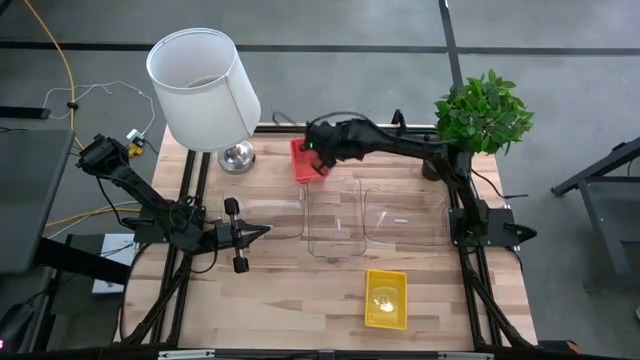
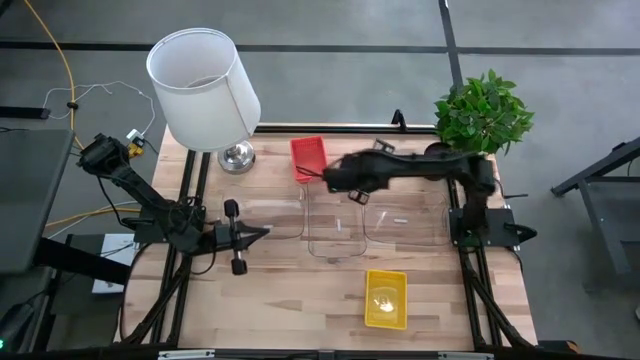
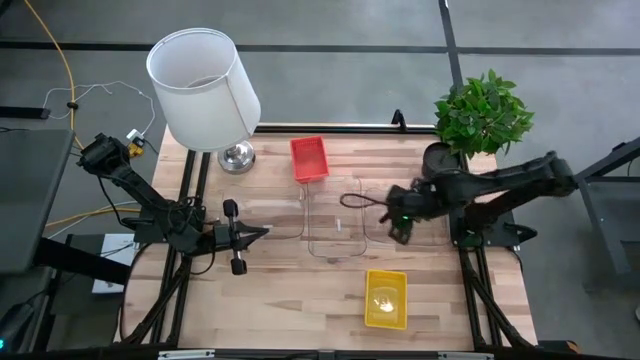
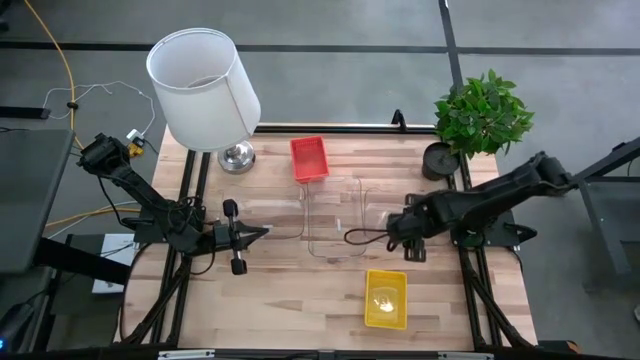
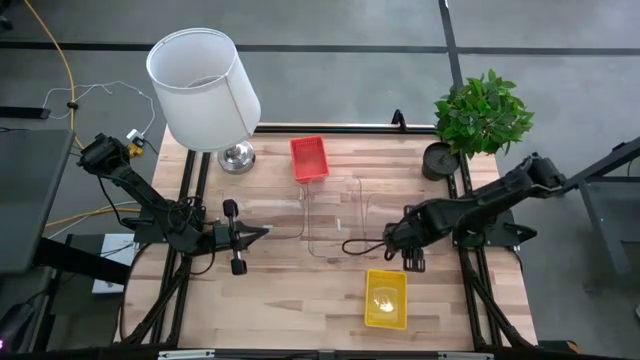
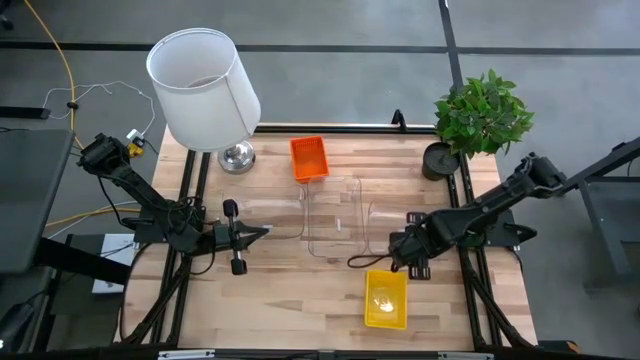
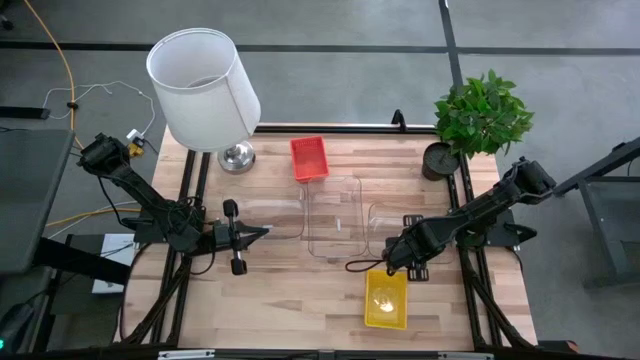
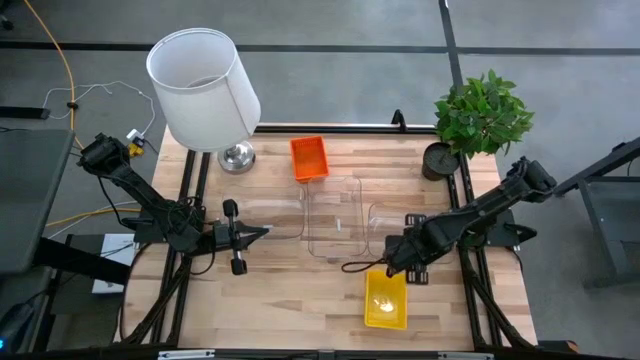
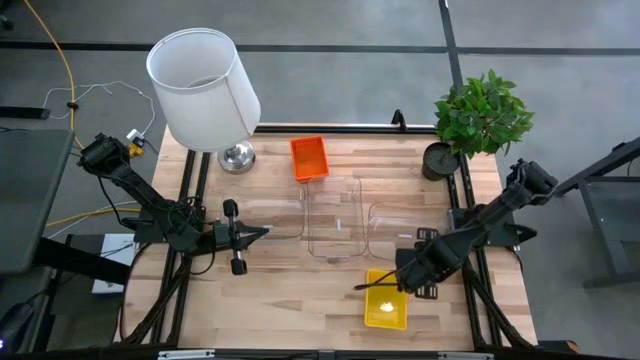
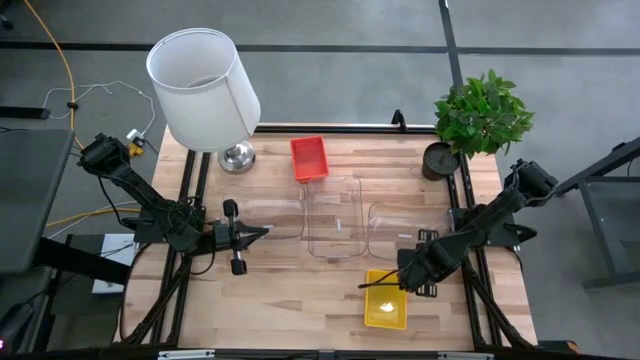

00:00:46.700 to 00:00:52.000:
Stack the right transparent bin on the middle transparent bin

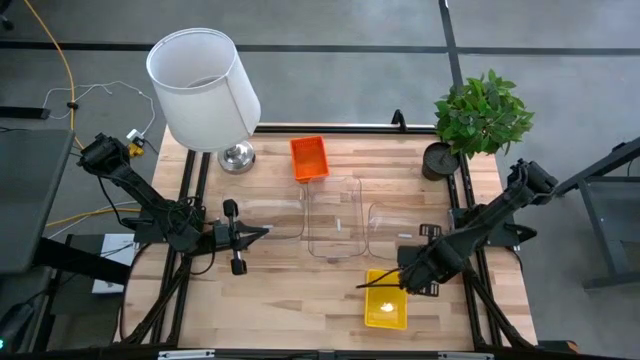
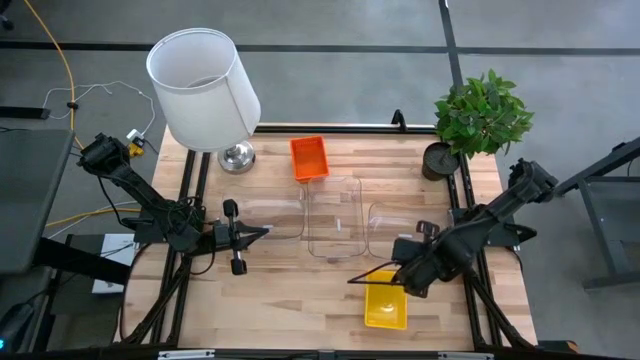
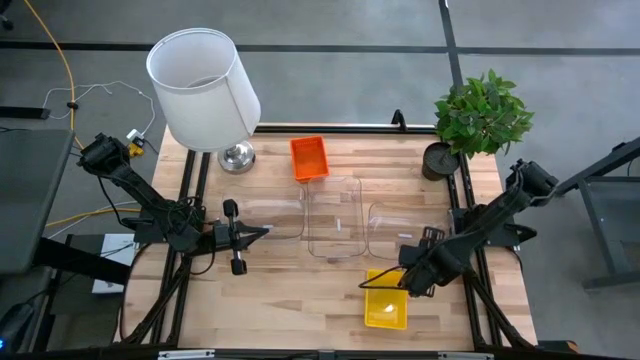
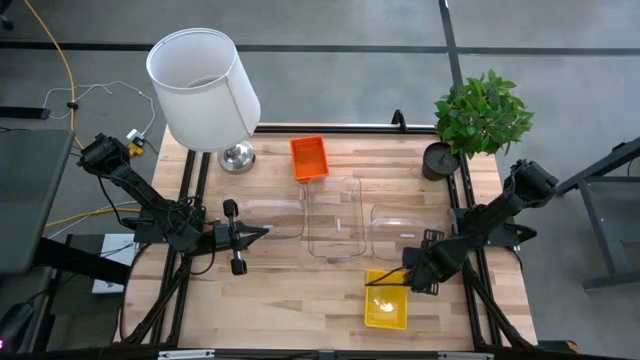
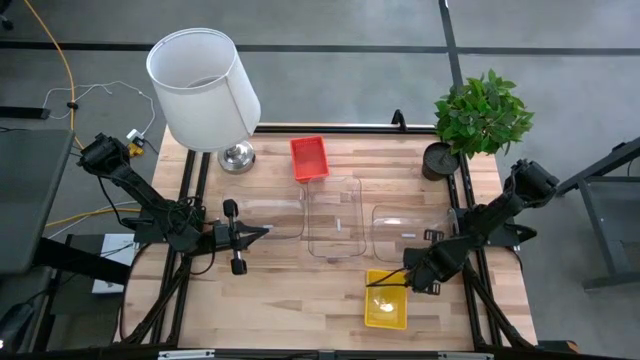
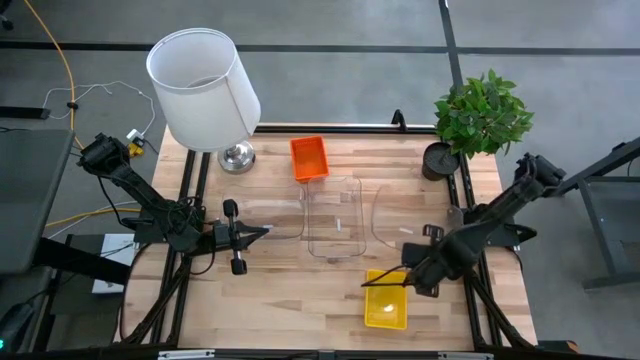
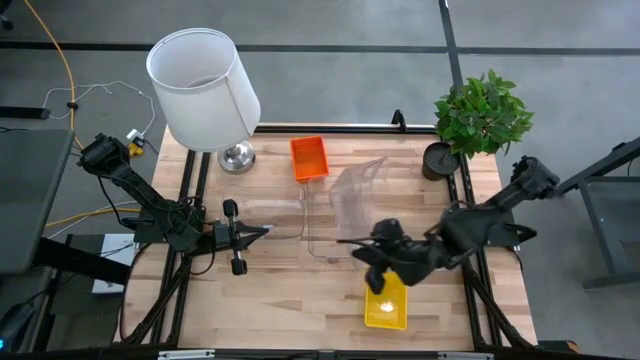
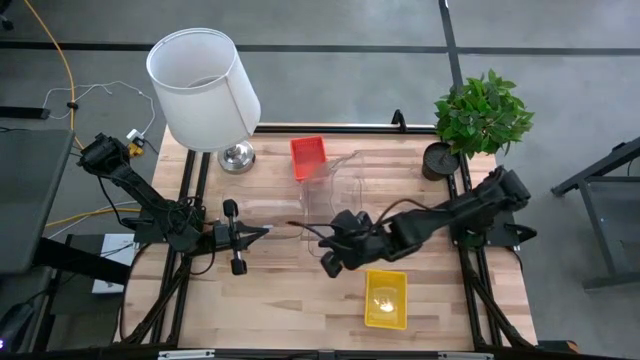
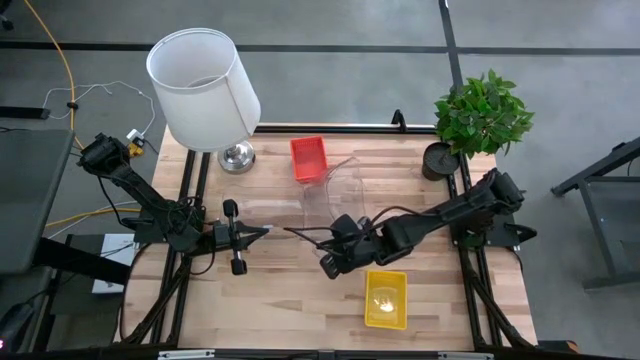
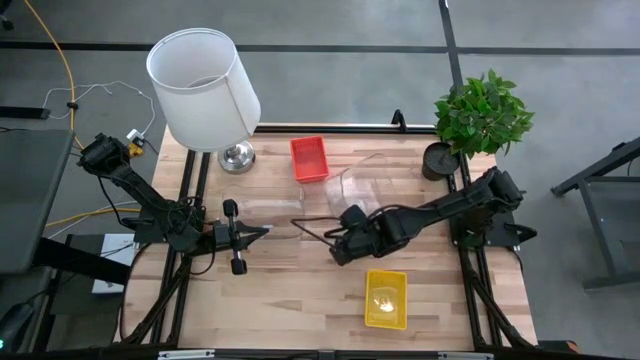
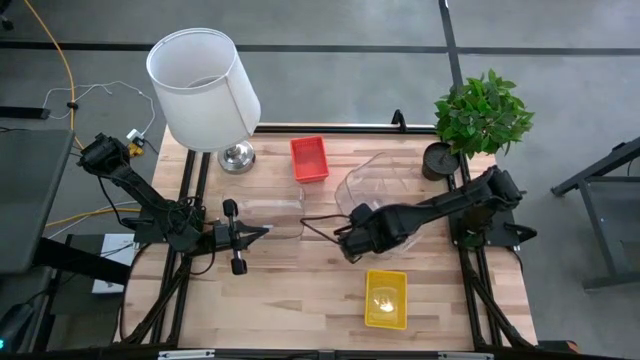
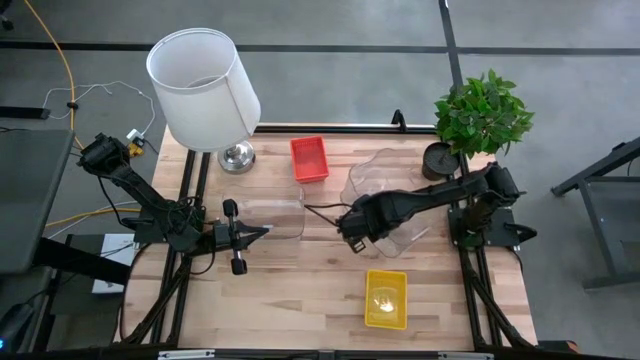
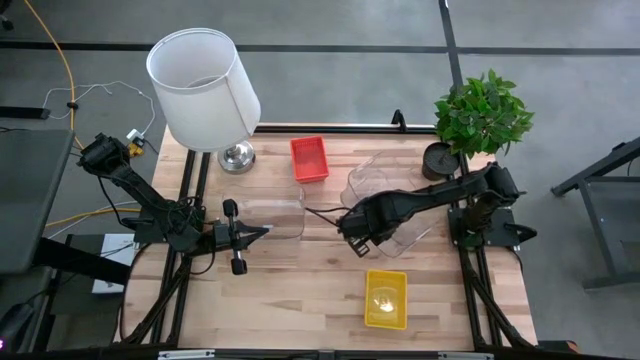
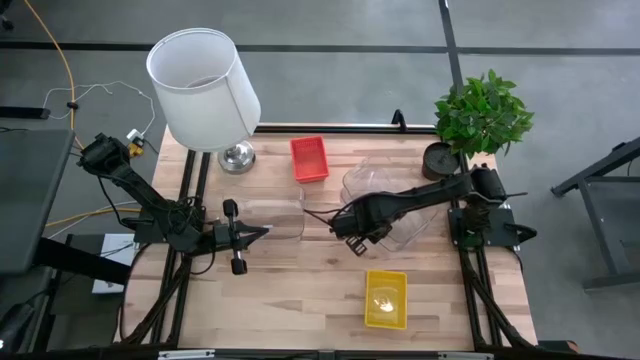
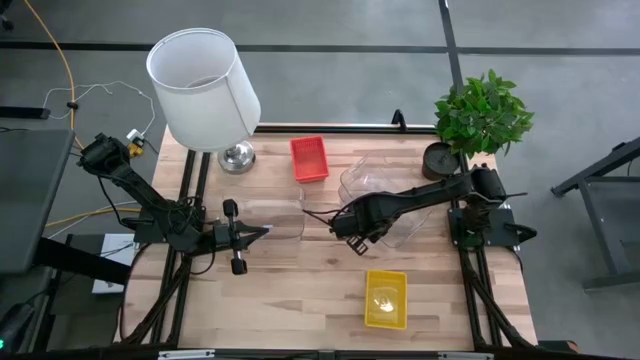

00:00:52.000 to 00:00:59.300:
Stack the right transparent bin on the middle transparent bin

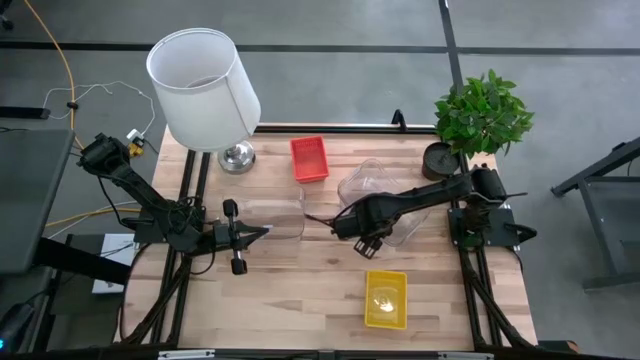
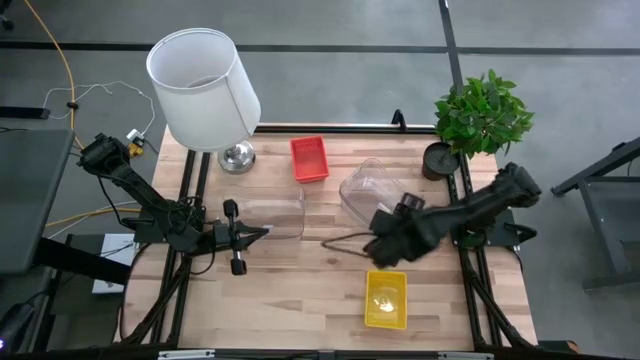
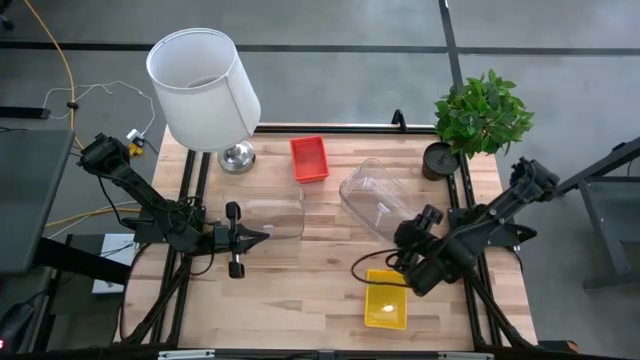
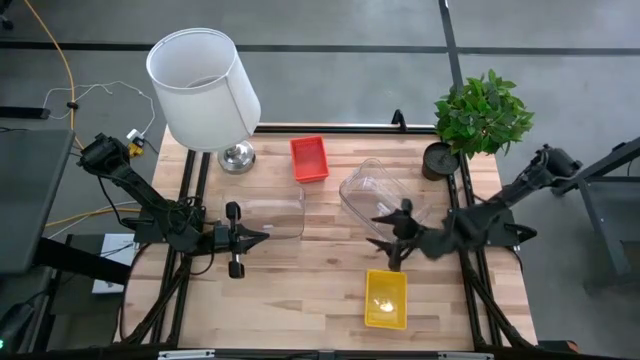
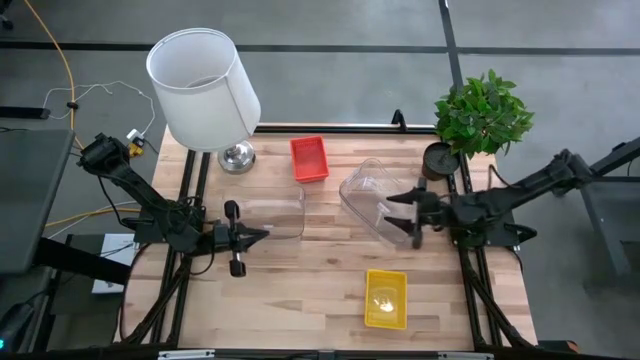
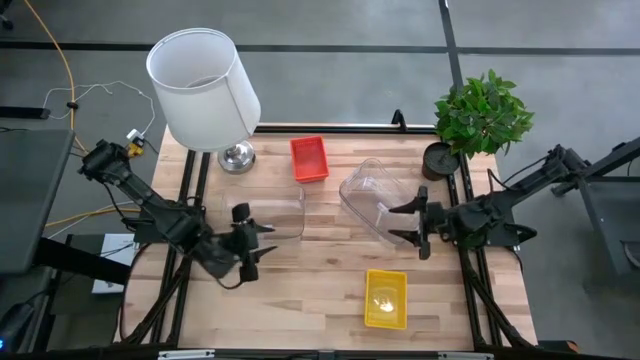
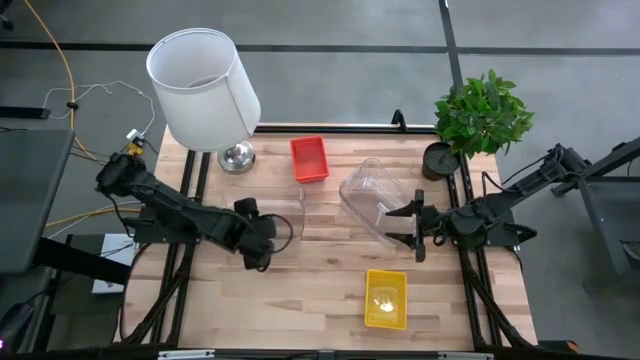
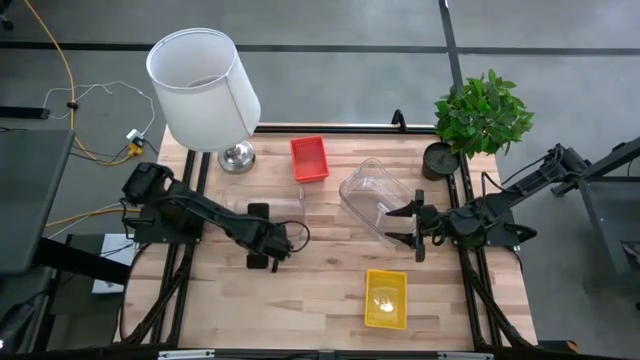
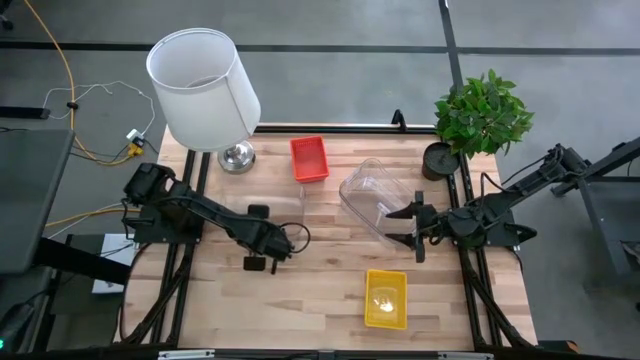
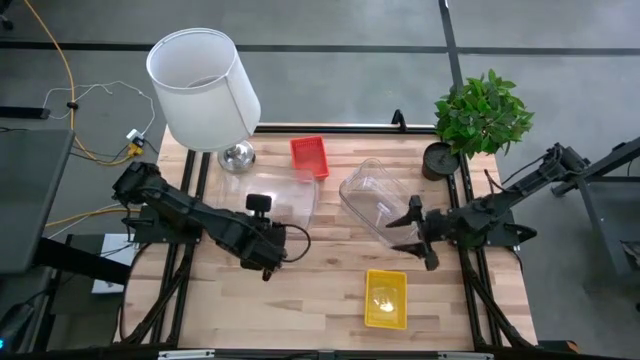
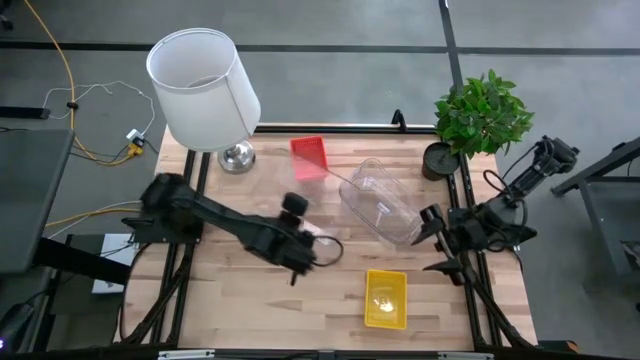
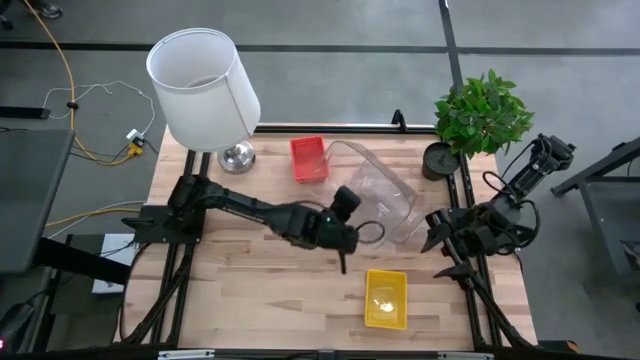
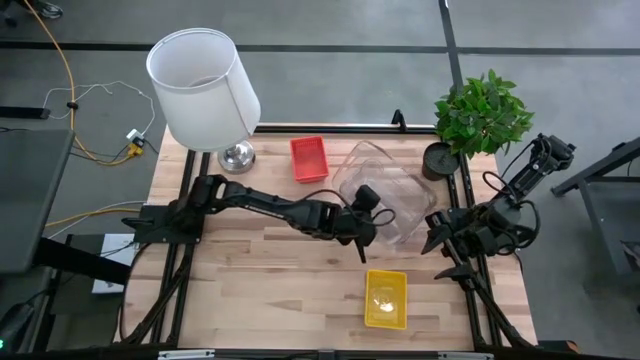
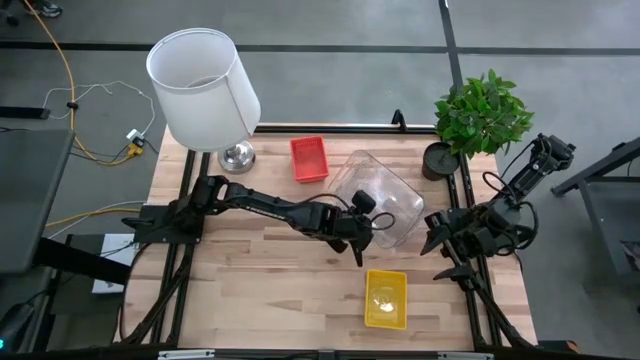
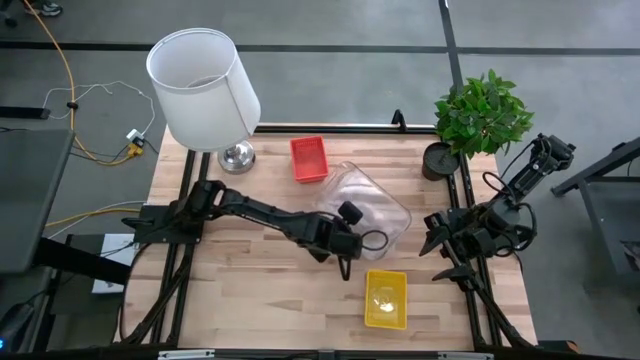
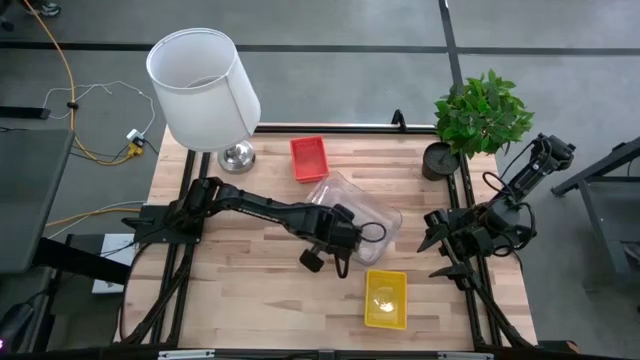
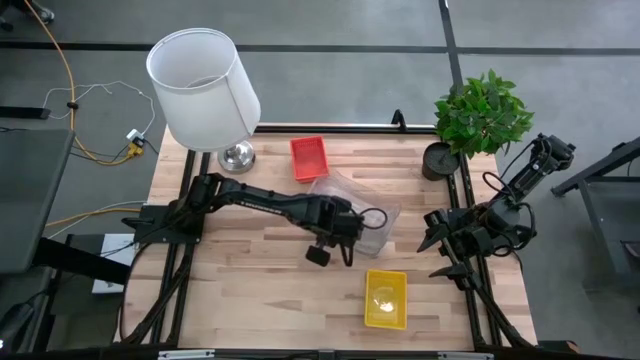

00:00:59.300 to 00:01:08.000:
Stack the left transparent bin on the right transparent bins
